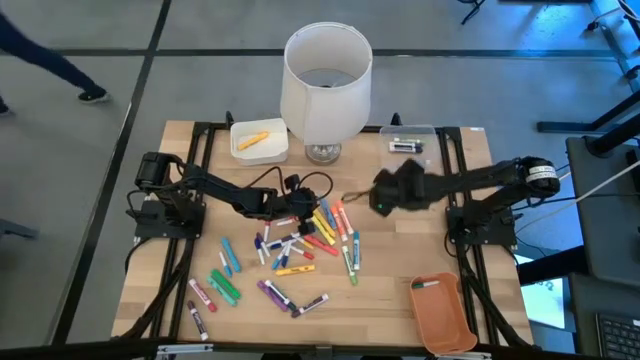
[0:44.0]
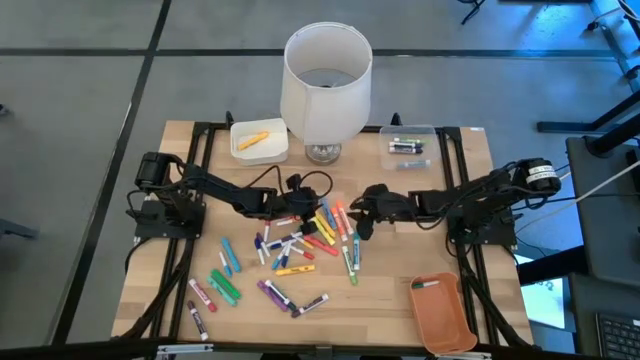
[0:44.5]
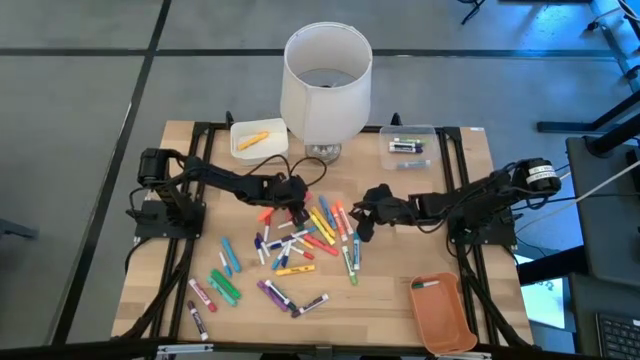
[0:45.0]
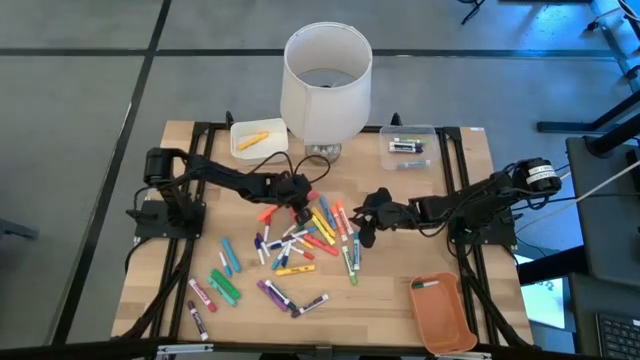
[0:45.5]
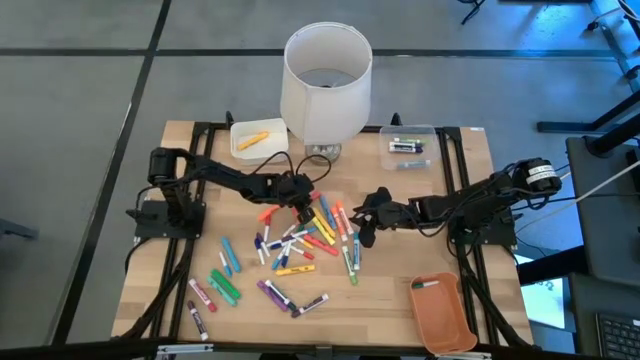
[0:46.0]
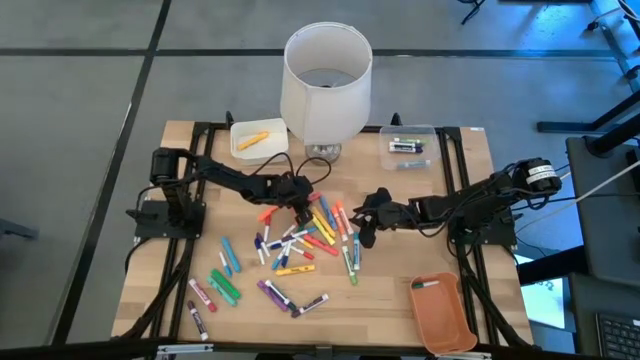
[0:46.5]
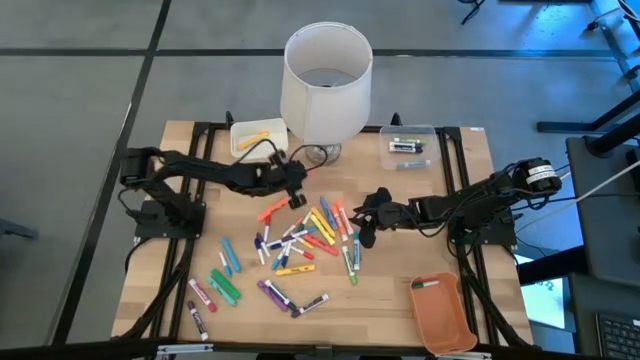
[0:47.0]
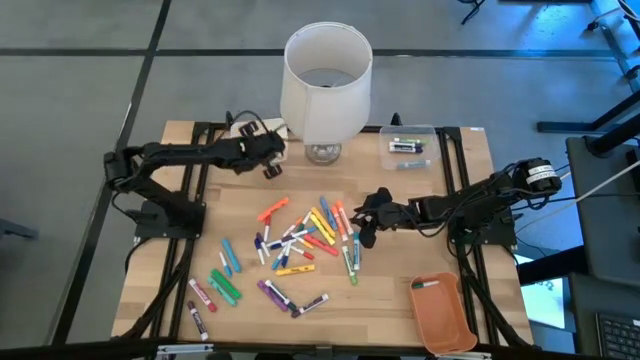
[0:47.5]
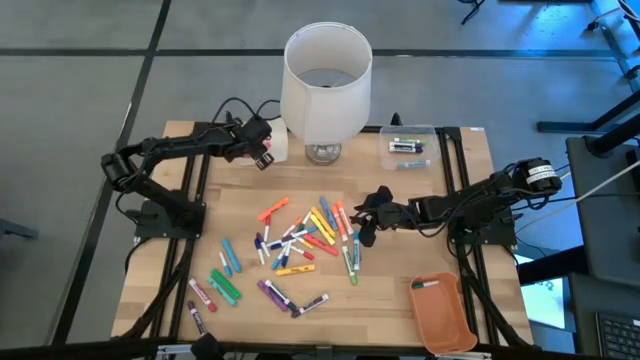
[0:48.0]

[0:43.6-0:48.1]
Task: Pick & Place Markers
Put the orange highlighter into the white bin

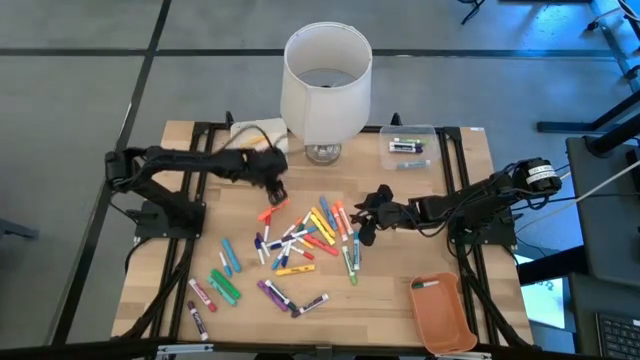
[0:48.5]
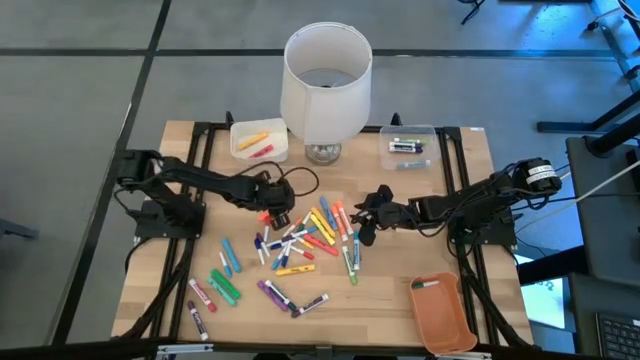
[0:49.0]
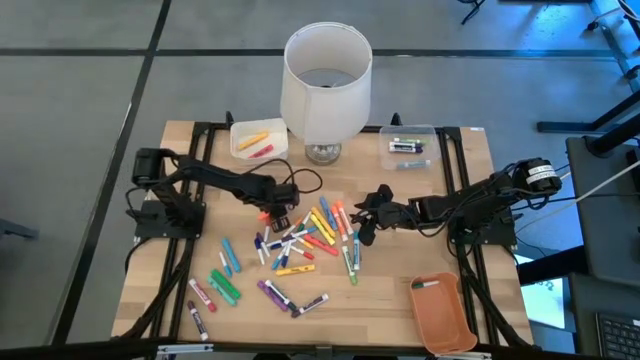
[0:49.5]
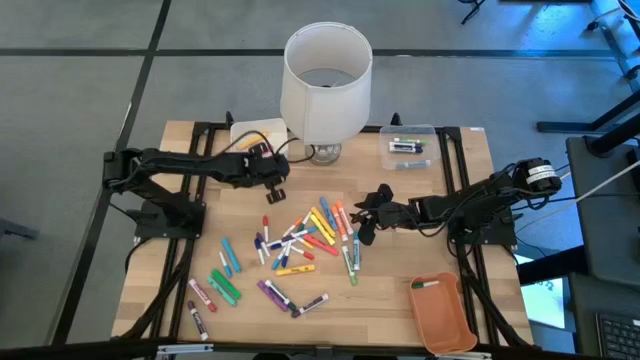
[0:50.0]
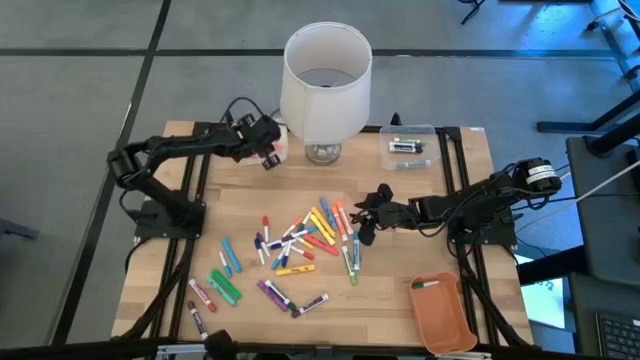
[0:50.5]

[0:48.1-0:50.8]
Put the light orange highlighter into the white bin

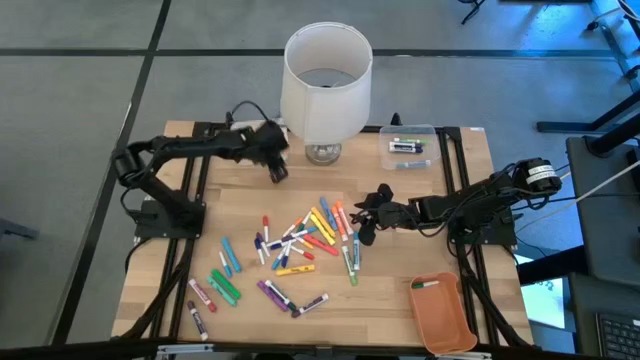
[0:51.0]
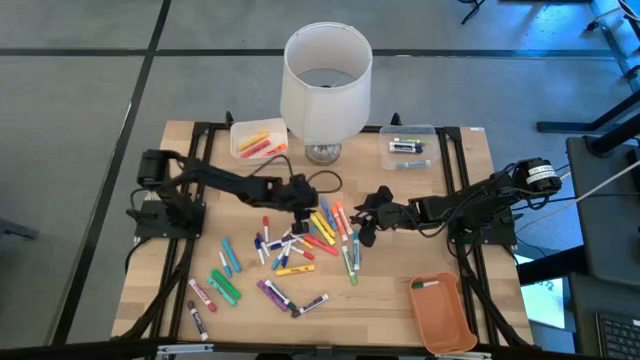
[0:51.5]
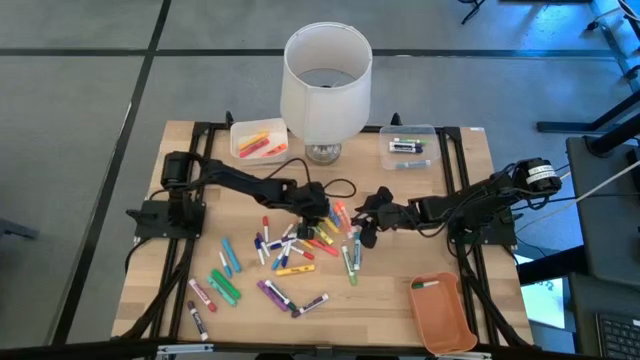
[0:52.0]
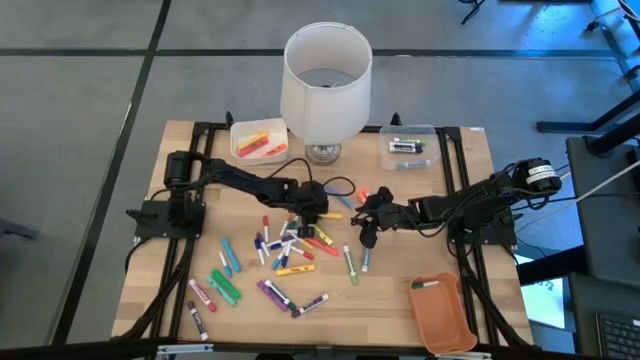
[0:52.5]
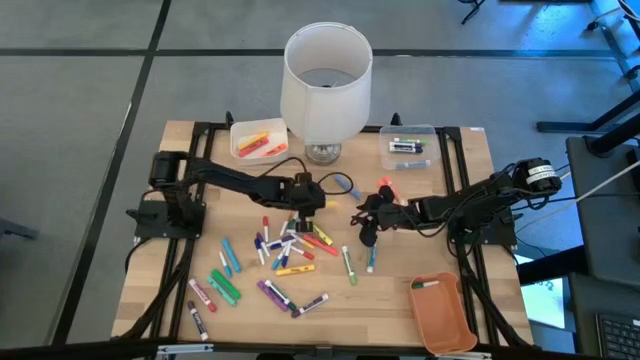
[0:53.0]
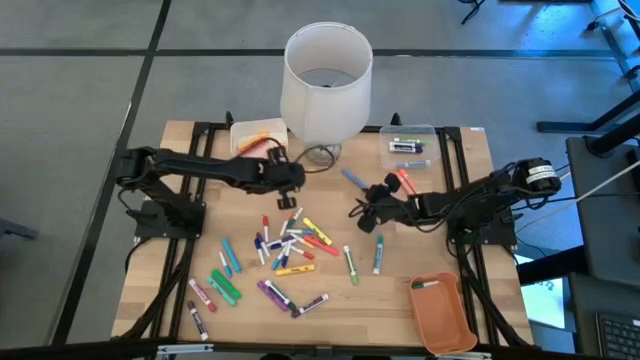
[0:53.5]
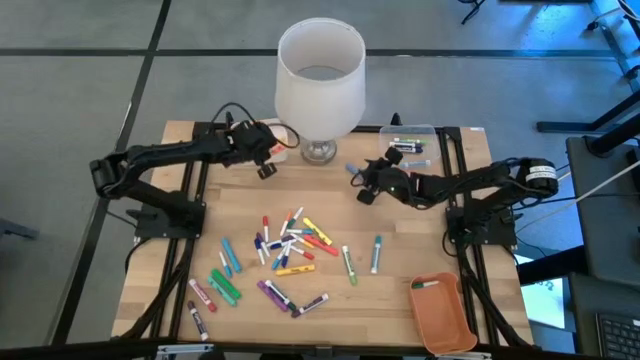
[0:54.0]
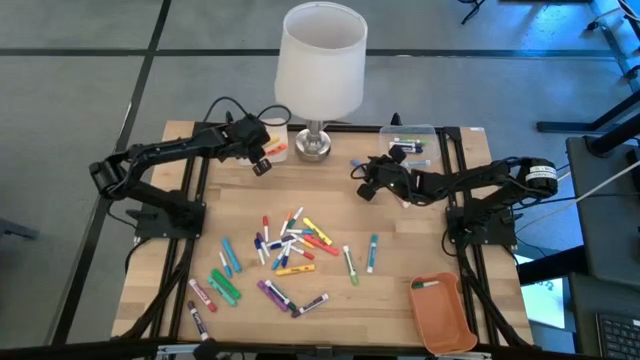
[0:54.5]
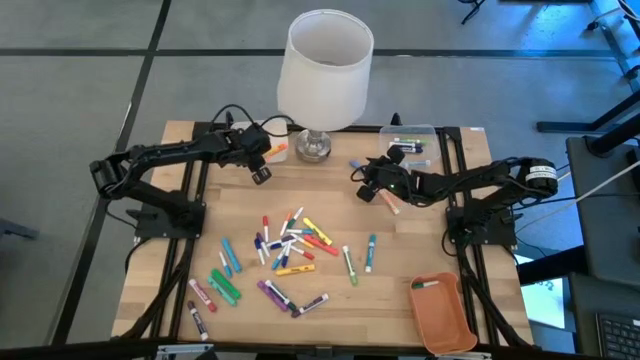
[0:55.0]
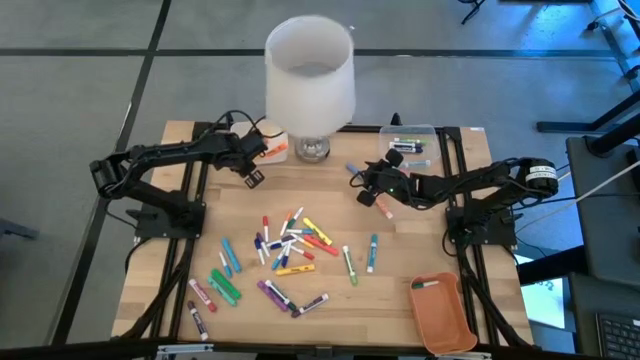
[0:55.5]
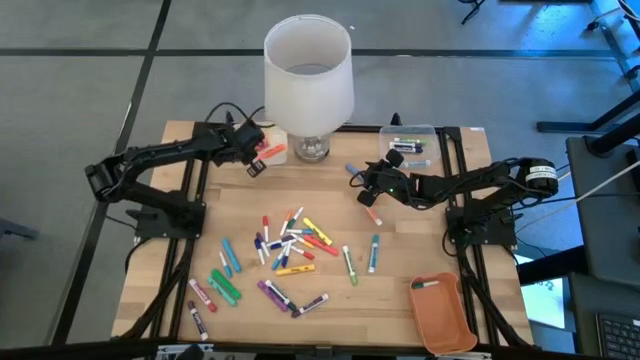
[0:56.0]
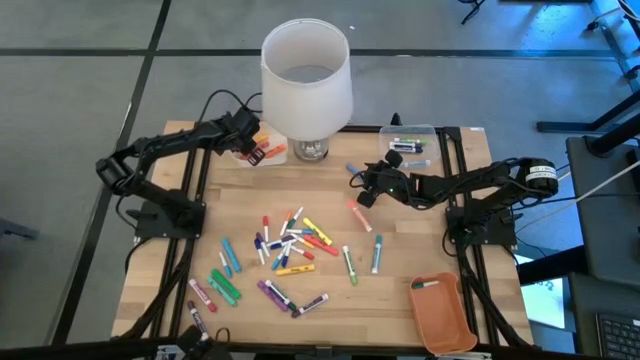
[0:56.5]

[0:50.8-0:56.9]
Put the yellow highlighter into the white bin

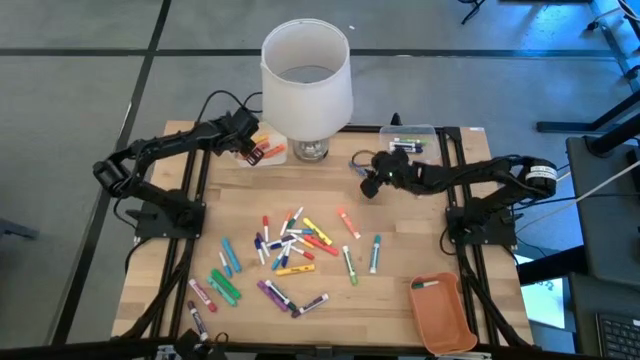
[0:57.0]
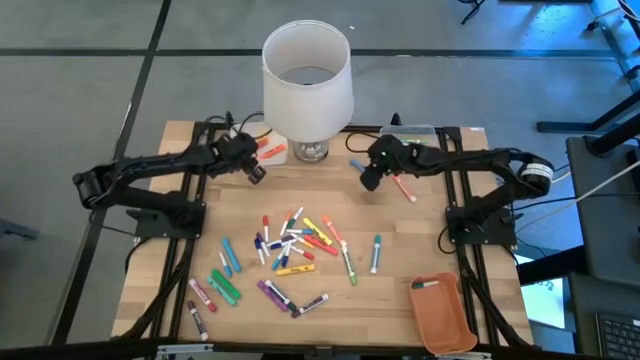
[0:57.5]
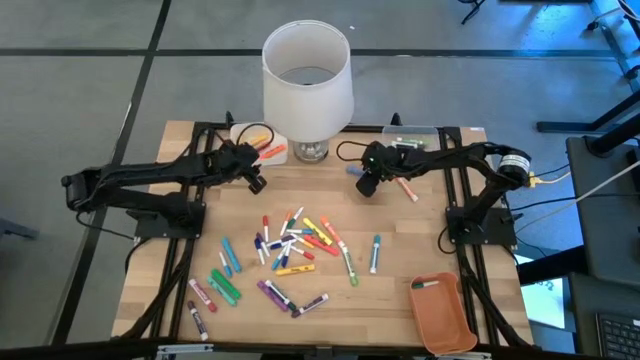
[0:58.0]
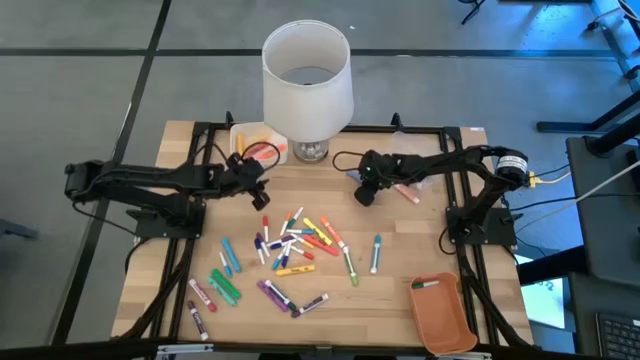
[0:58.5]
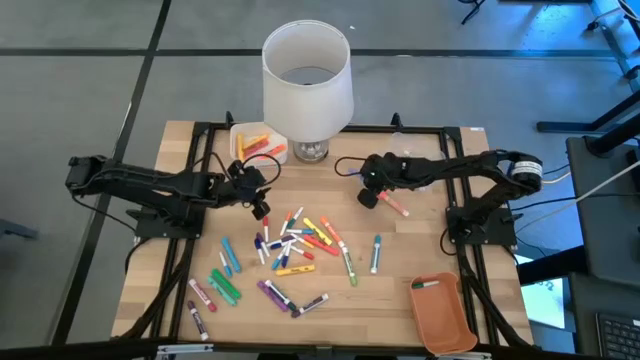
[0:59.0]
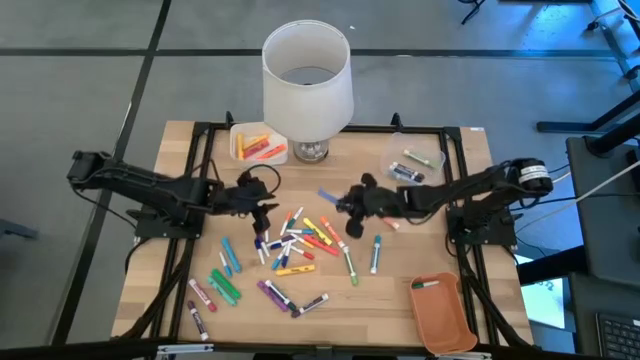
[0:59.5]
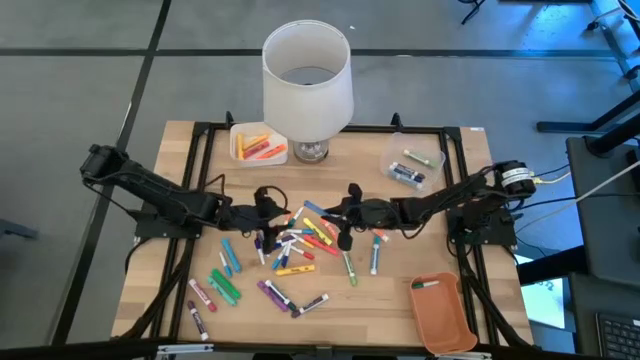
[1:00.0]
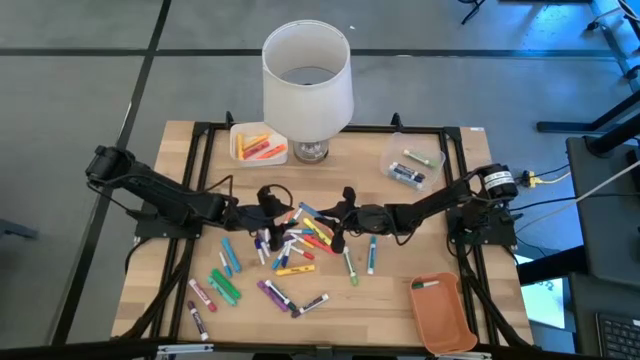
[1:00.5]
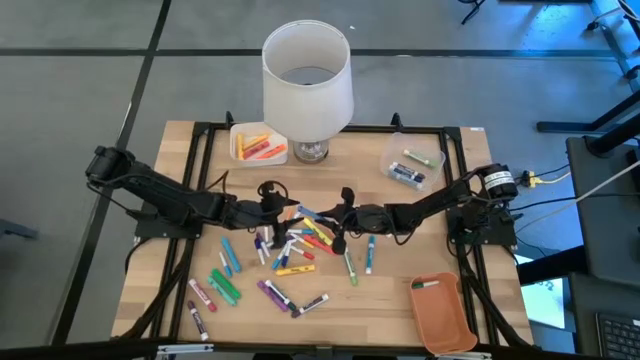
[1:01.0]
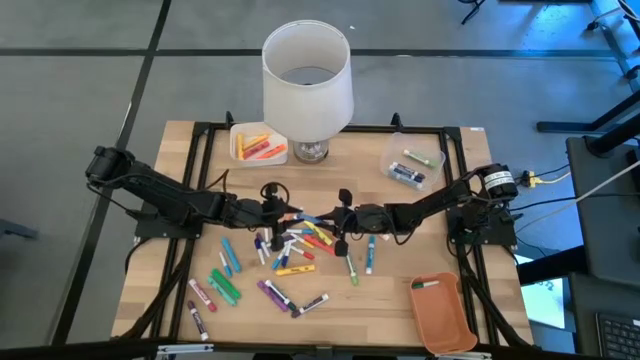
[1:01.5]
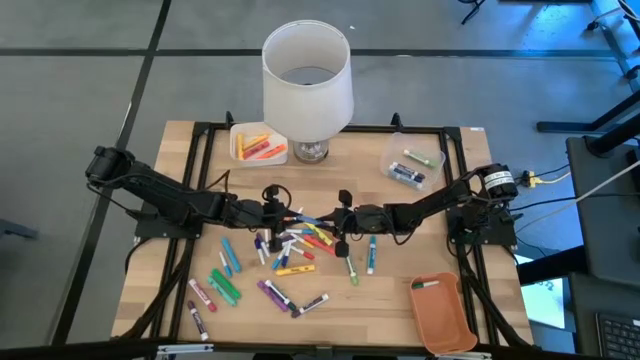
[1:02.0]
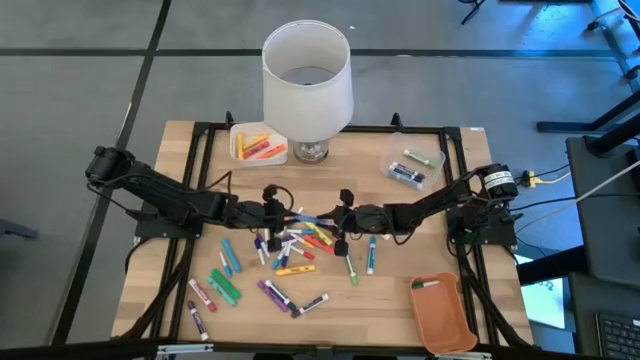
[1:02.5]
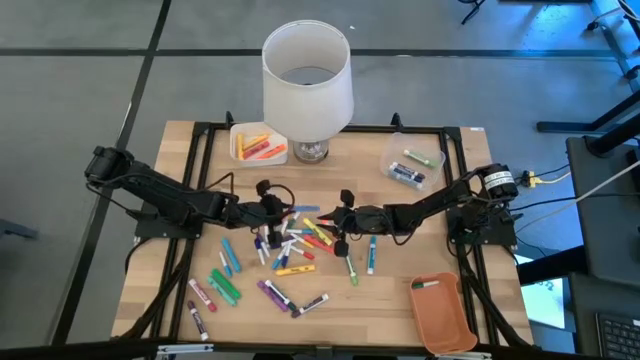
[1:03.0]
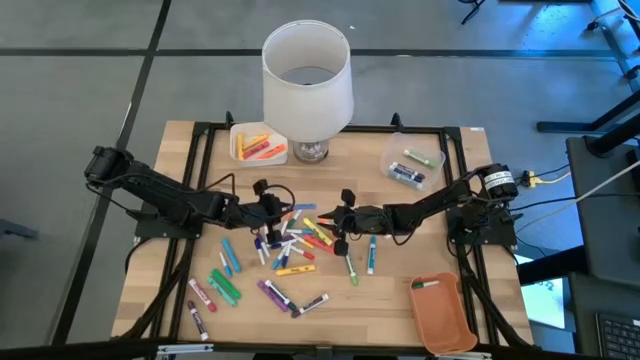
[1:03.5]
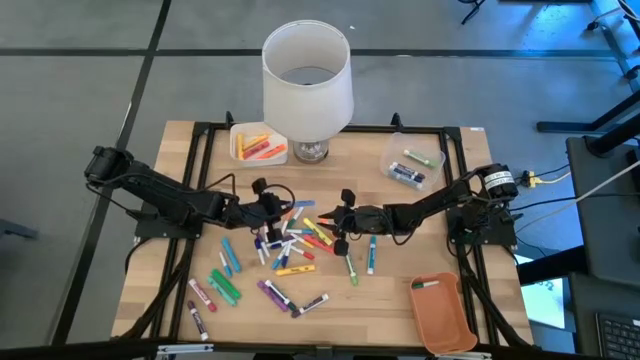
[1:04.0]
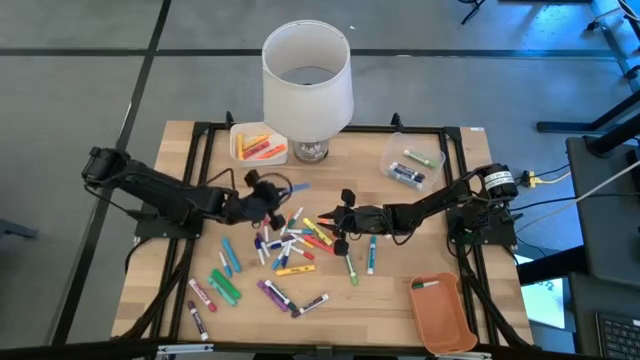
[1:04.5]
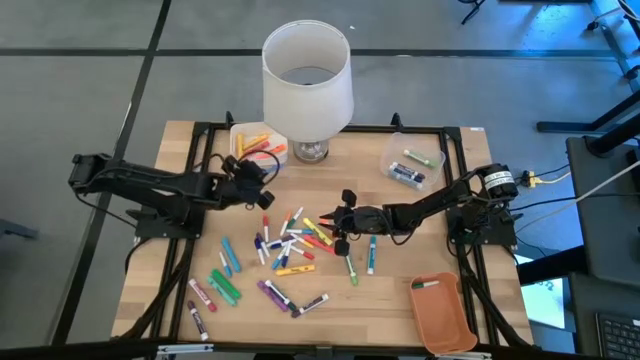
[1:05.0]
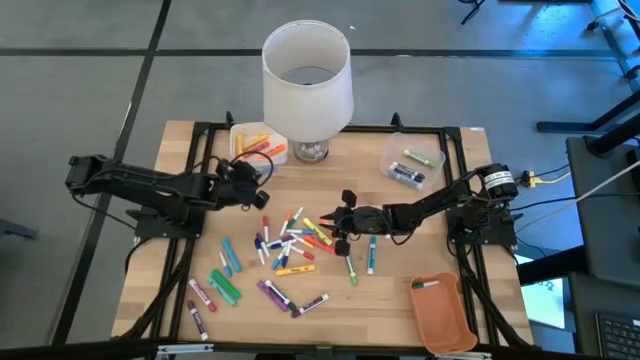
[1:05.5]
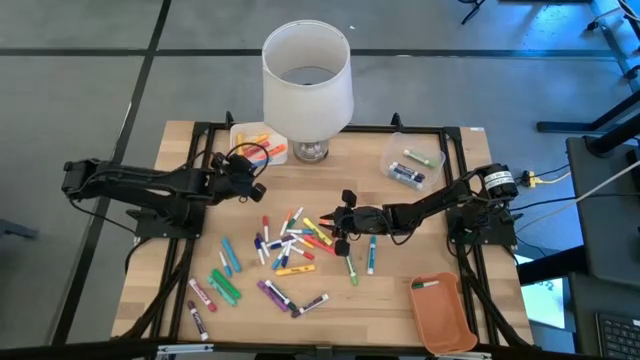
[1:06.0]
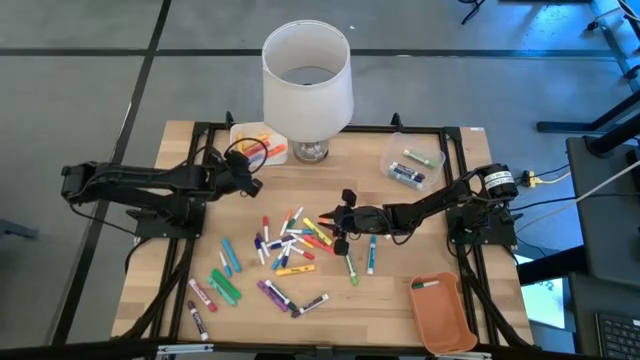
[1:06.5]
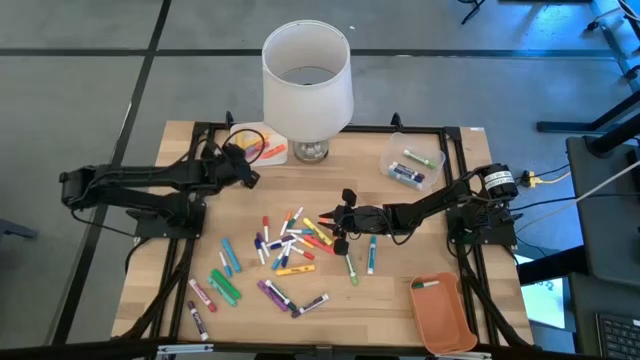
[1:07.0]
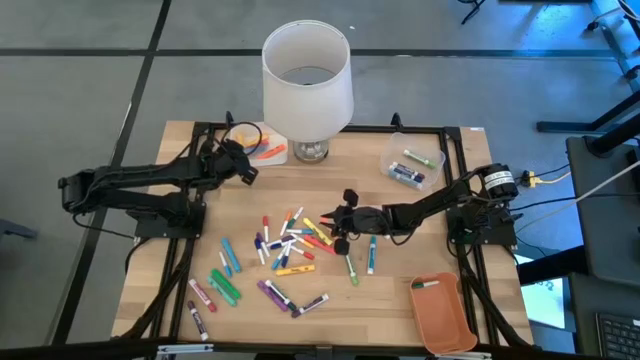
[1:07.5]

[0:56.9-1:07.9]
Put the dark blue highlighter into the white bin
